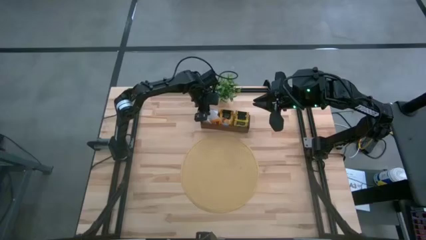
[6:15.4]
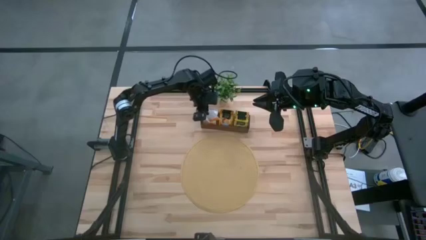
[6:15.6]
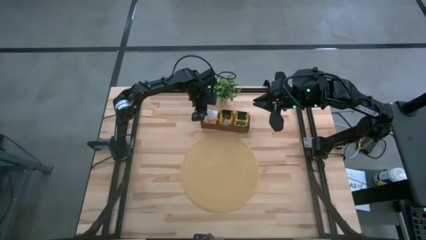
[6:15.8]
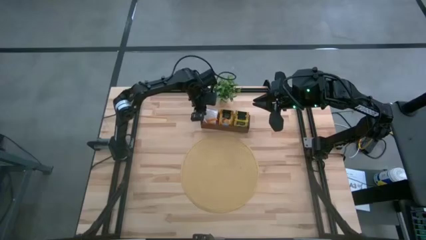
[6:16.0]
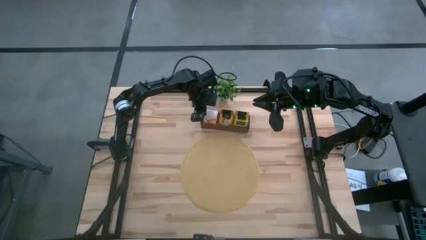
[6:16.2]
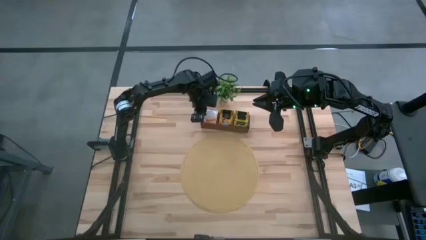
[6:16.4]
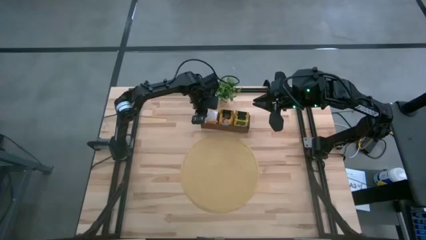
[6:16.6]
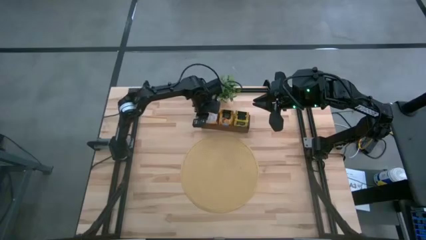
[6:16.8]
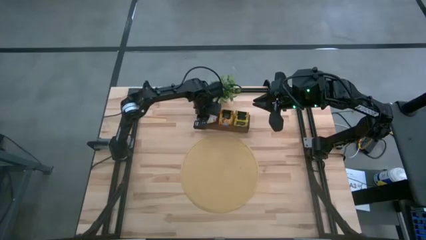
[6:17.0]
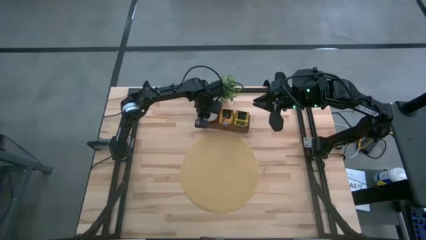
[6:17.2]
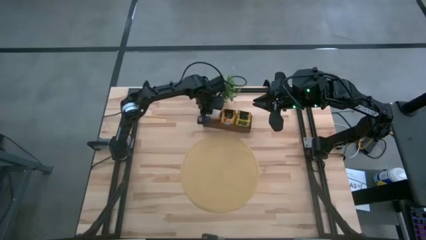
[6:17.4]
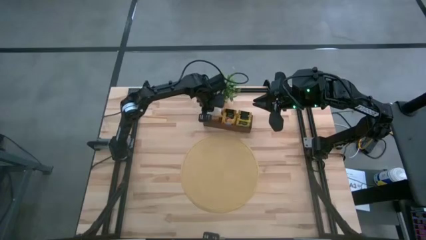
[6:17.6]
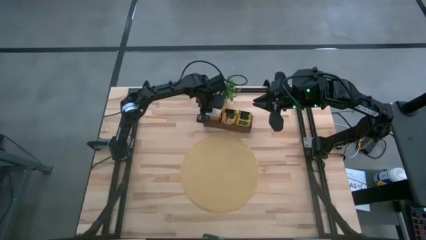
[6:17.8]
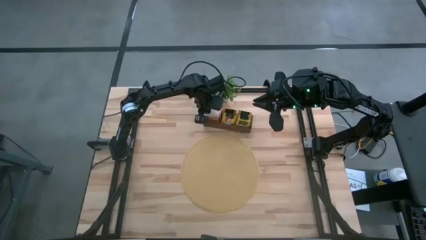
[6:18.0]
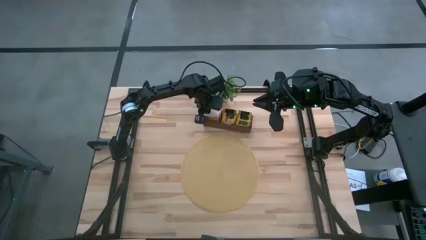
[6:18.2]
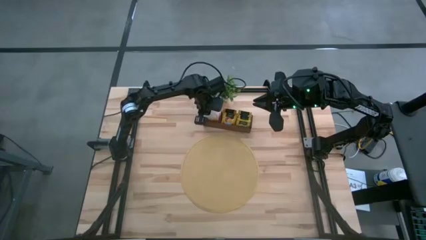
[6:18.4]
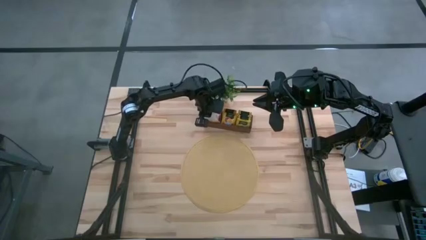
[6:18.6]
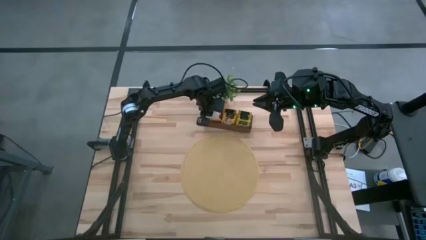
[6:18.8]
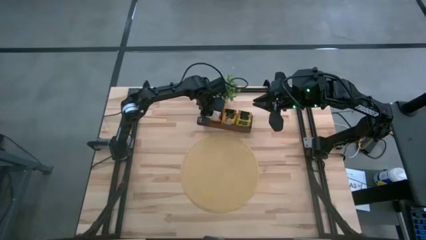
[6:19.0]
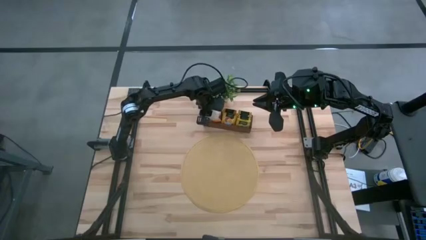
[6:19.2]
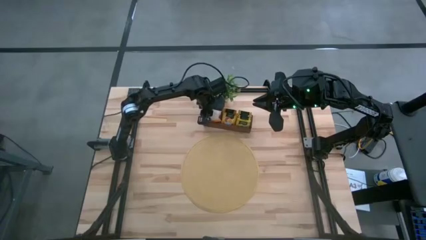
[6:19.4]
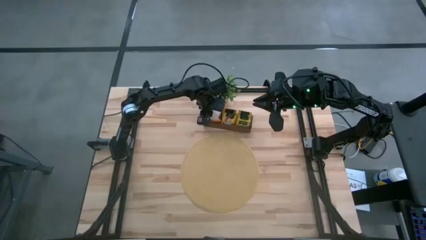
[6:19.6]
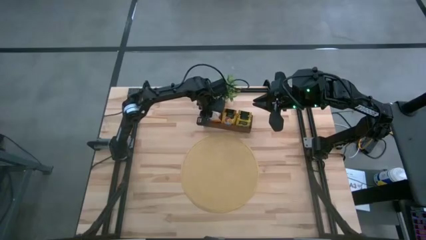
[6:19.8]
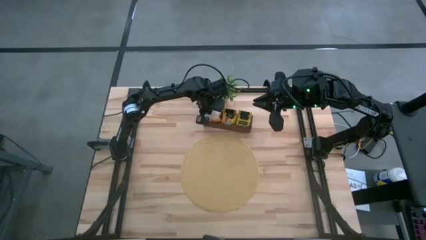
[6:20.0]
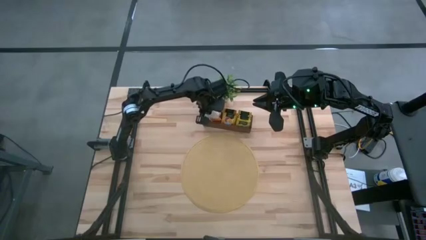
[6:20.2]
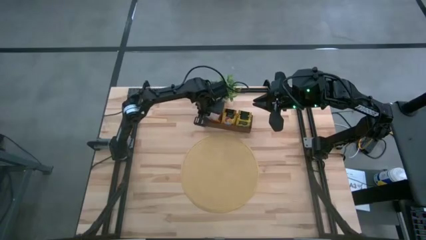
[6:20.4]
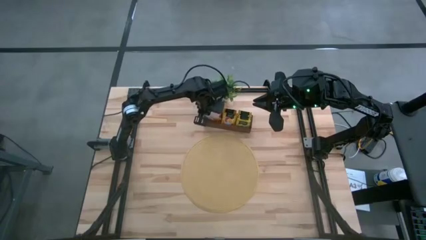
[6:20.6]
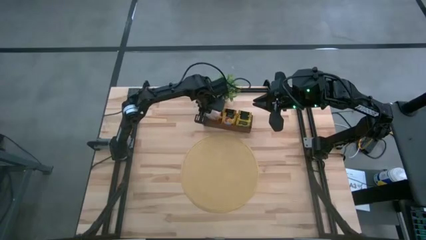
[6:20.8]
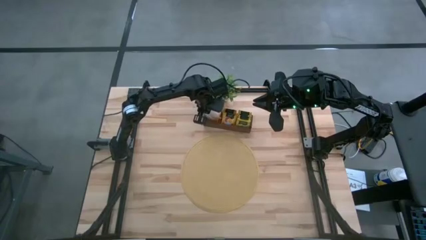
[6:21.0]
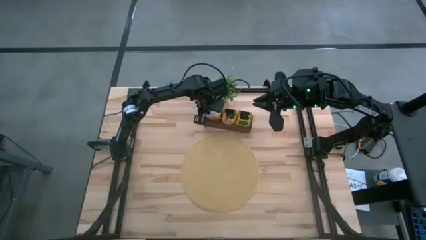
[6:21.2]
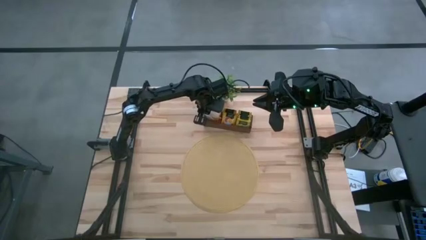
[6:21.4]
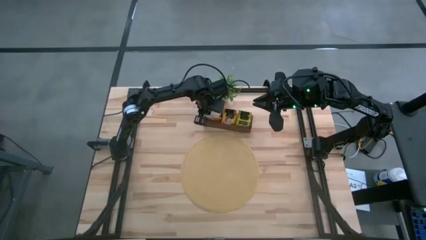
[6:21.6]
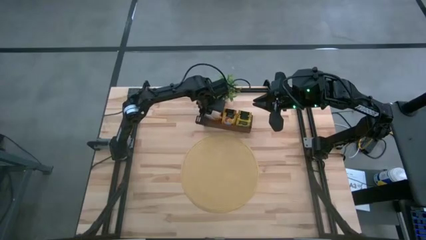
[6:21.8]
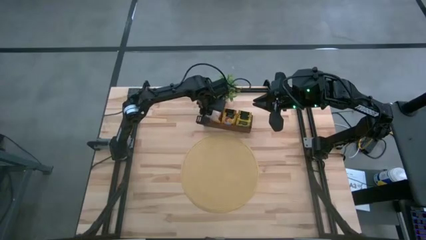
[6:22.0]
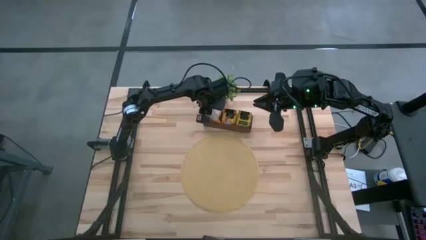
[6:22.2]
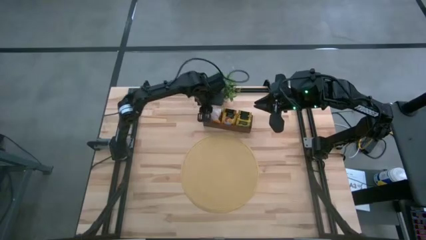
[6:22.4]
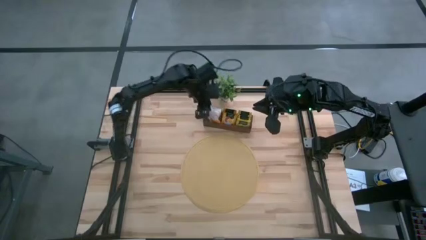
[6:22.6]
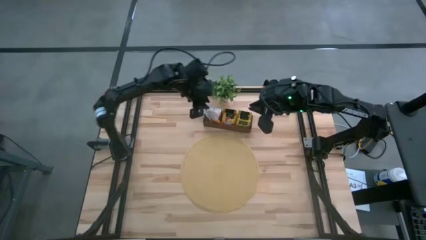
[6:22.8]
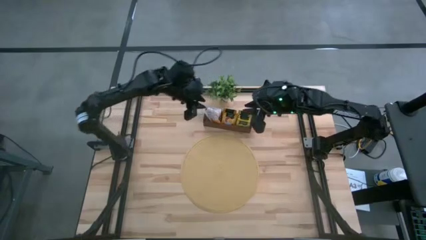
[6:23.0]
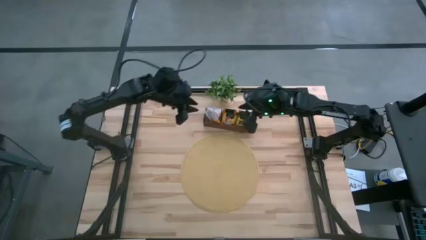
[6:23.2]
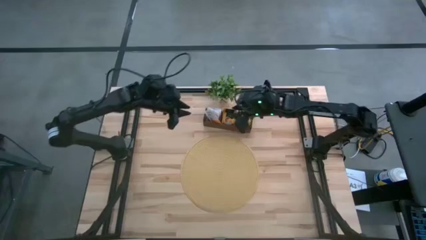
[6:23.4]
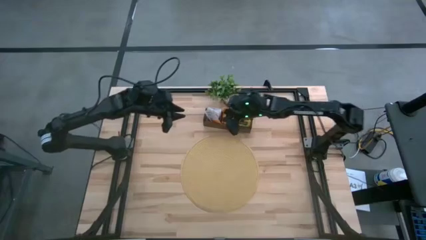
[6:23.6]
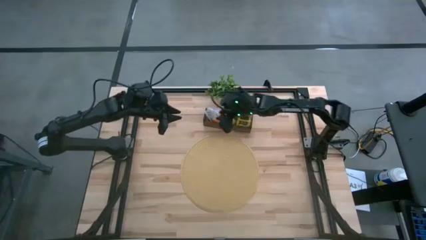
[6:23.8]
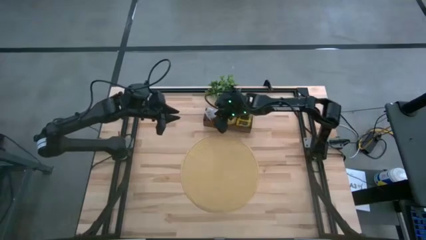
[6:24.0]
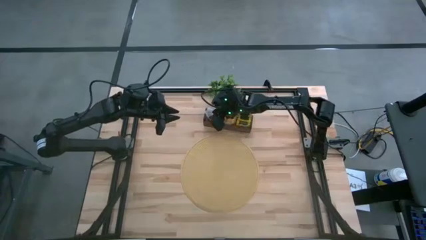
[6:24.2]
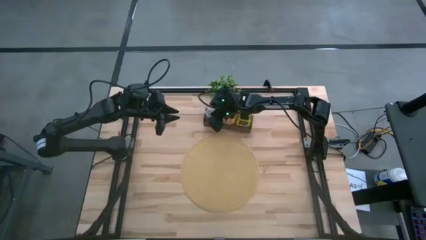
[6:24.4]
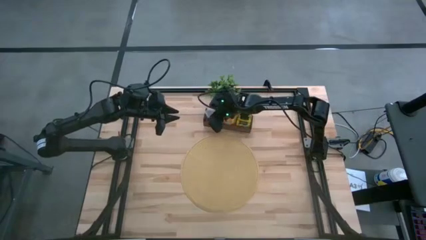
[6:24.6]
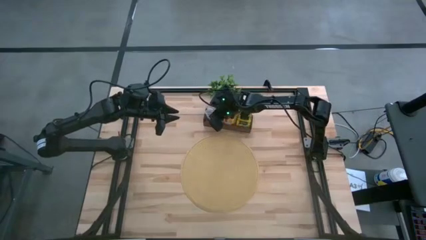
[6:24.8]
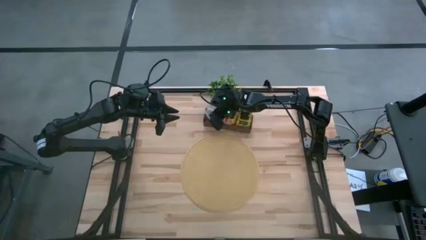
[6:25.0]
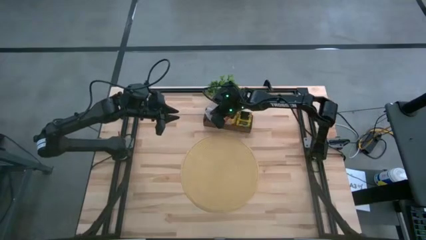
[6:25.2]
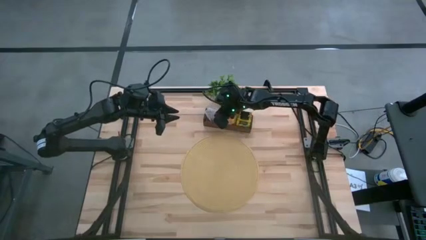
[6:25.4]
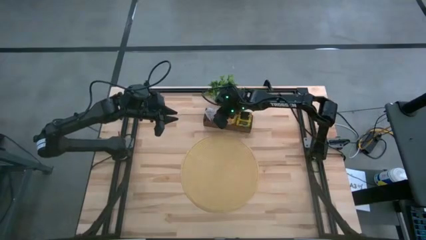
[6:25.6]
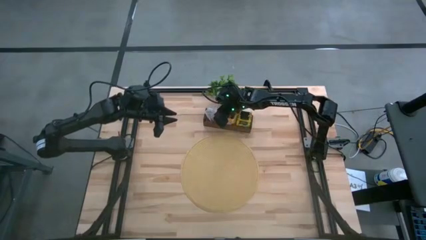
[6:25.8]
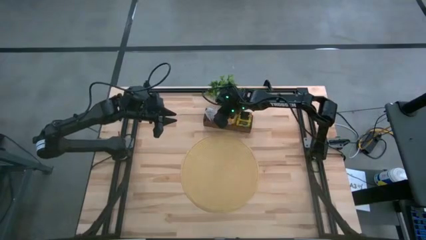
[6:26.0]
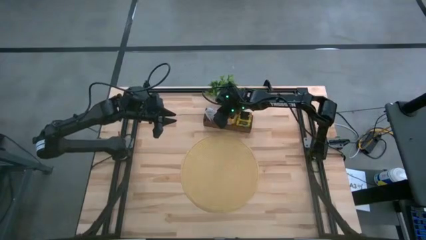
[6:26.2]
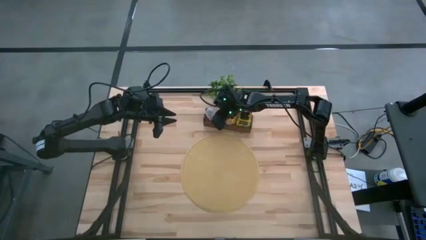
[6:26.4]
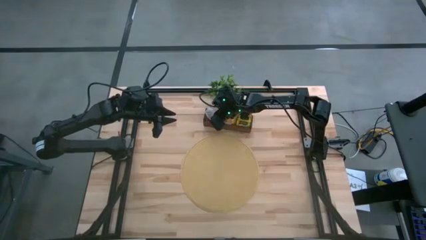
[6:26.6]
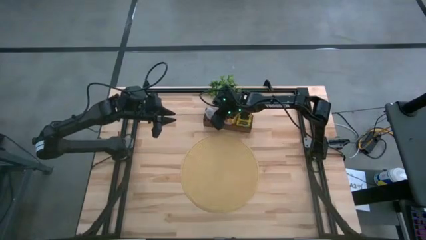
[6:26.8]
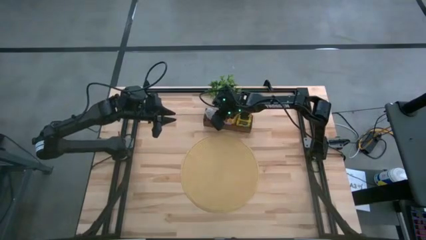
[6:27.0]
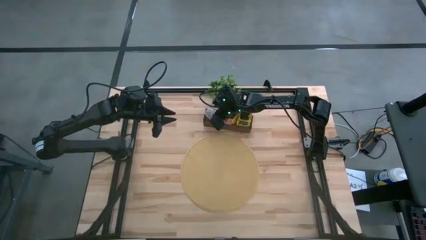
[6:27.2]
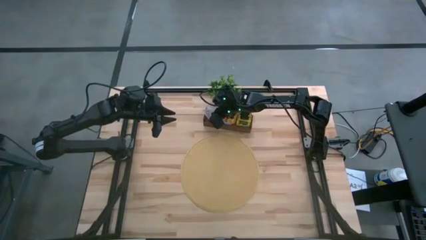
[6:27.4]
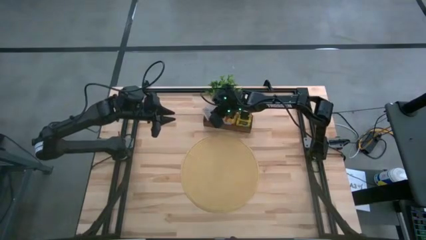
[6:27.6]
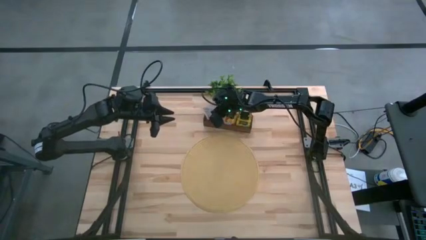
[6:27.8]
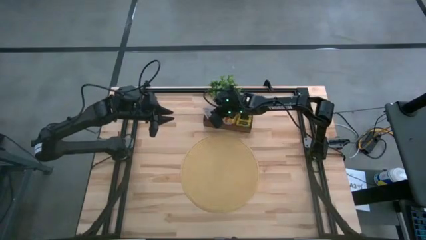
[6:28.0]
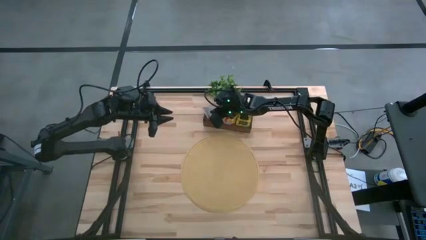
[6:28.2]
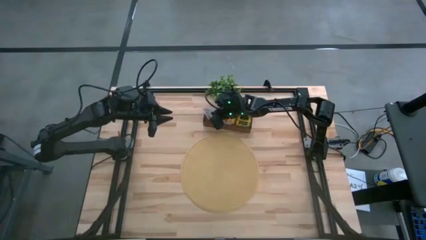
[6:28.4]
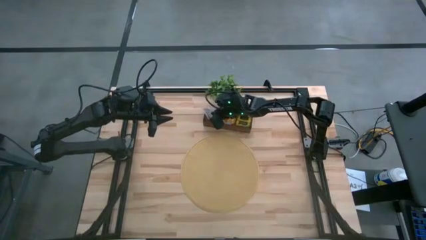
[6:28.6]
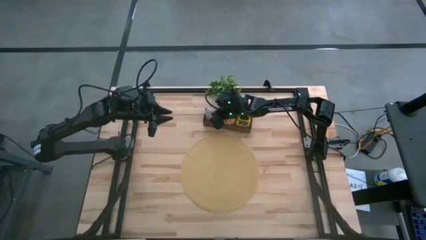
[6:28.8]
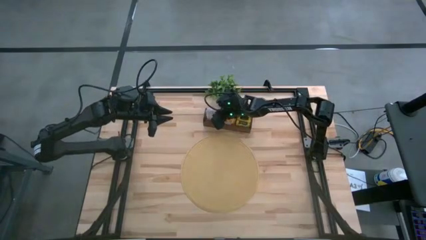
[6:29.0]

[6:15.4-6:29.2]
Task: Pick & Place Tea
Put the white tea bag into the left section of the wooden organizer

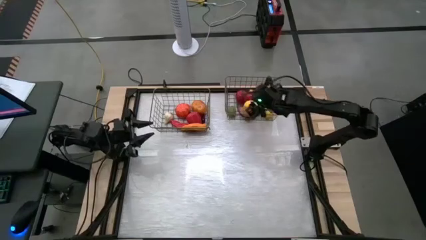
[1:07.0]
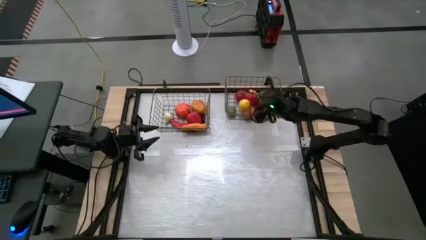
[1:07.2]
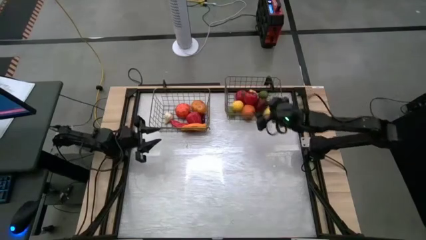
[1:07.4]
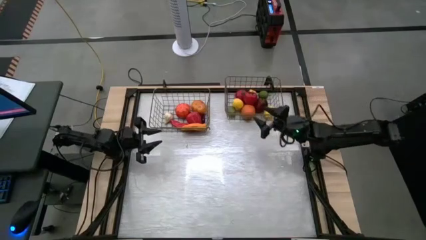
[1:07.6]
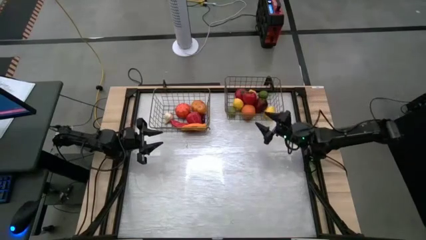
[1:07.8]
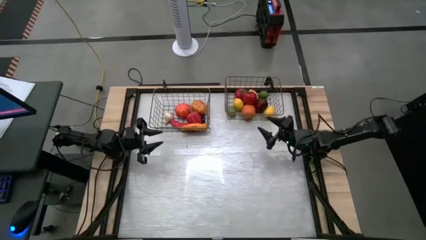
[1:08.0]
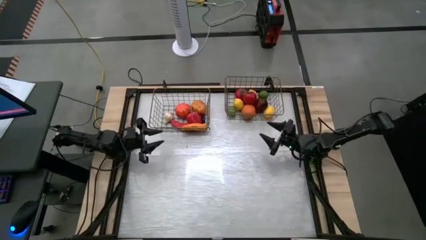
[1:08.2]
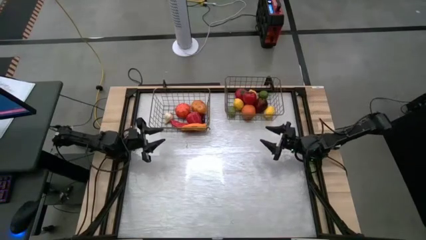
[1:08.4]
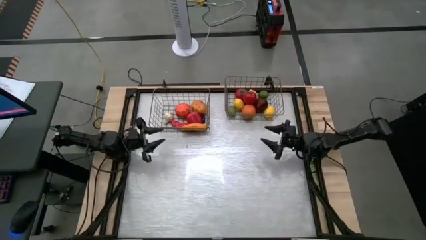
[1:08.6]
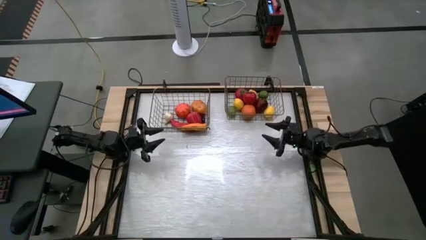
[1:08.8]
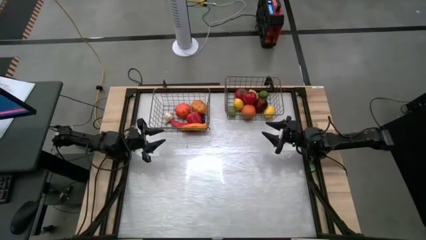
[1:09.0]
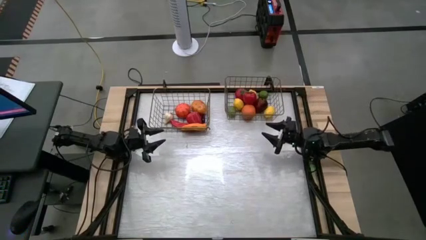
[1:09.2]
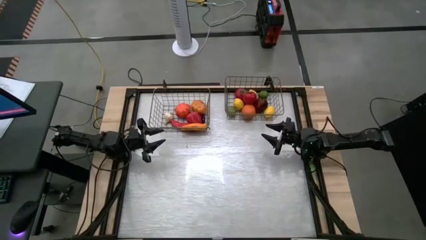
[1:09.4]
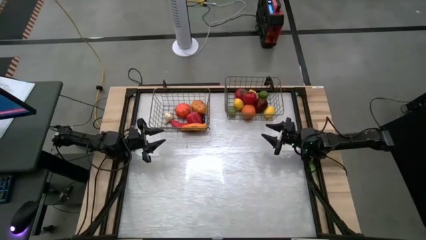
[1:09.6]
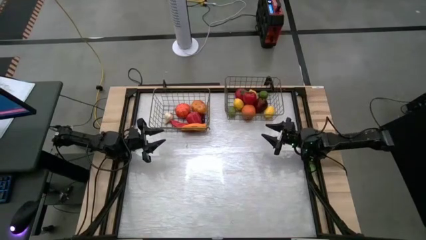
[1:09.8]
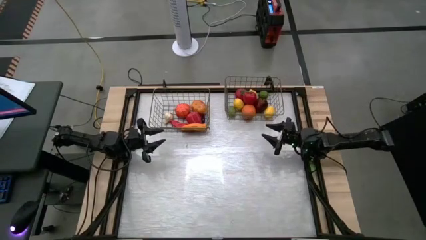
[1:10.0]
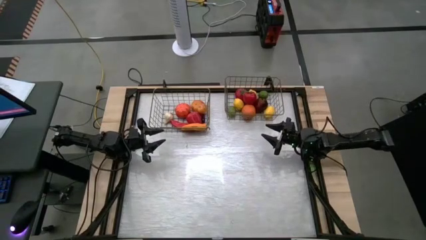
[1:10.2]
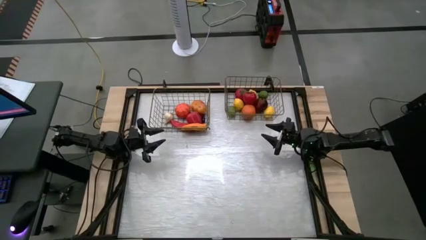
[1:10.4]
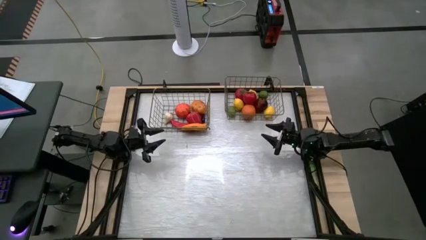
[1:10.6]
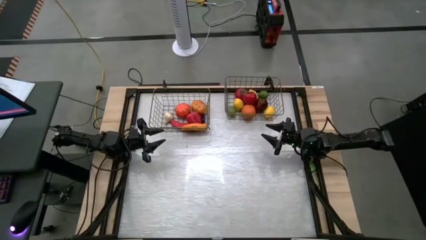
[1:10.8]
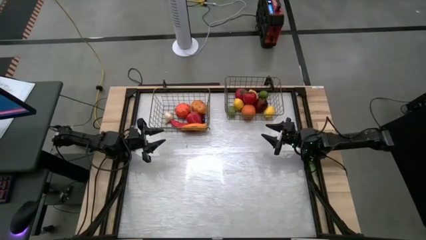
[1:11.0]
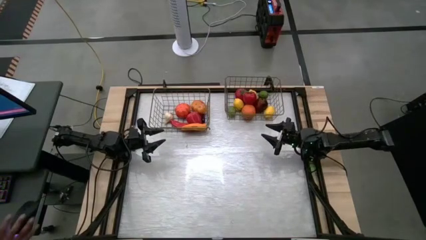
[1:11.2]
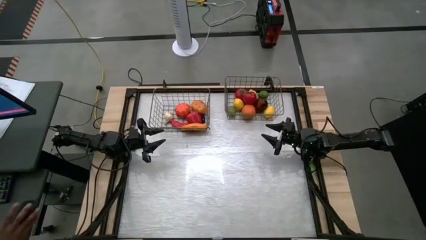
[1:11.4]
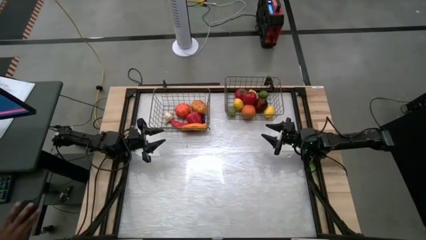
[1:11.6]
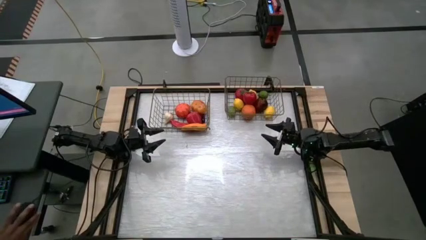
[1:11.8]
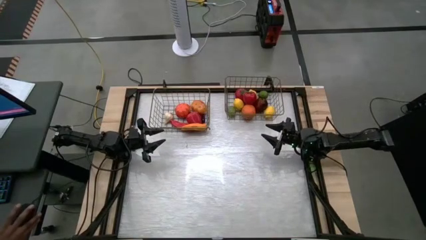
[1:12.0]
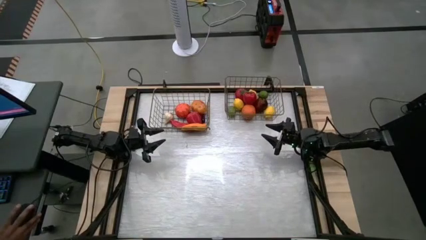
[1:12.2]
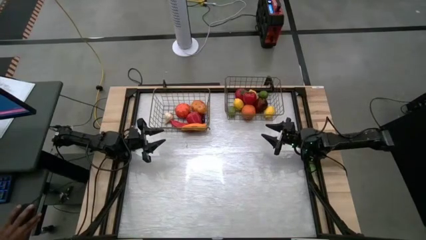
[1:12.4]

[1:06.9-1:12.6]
Task: Sort produce into baskets
Return to Home Position
